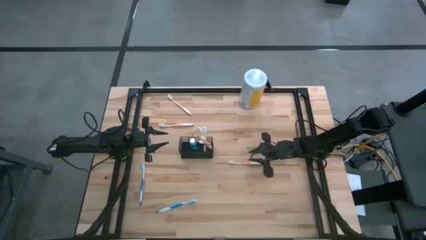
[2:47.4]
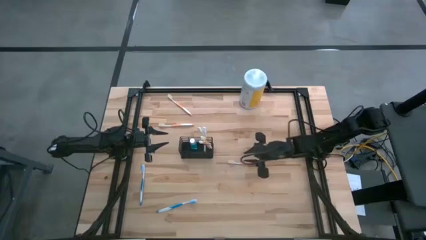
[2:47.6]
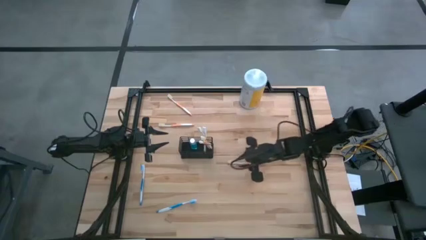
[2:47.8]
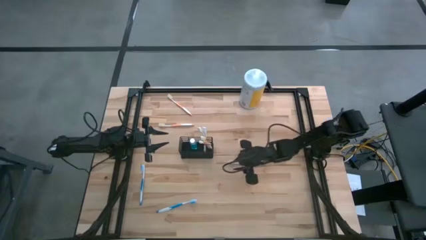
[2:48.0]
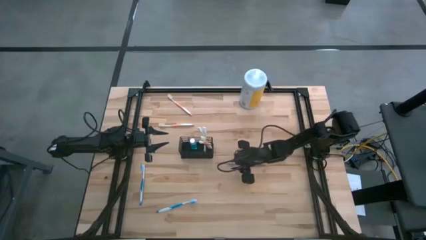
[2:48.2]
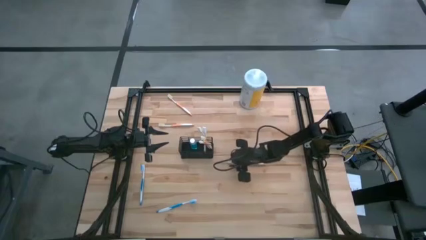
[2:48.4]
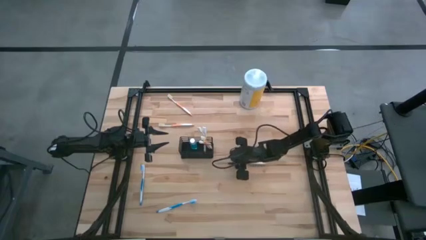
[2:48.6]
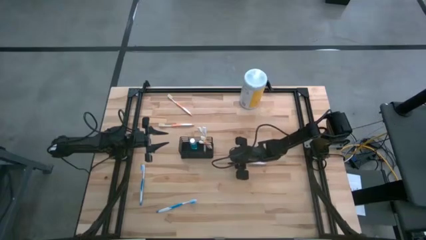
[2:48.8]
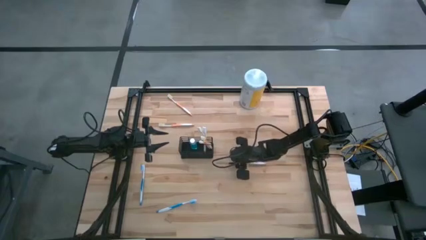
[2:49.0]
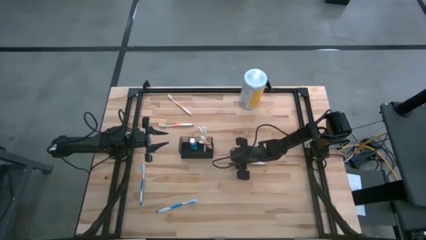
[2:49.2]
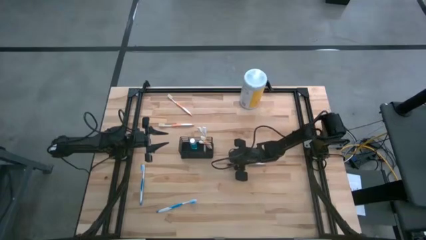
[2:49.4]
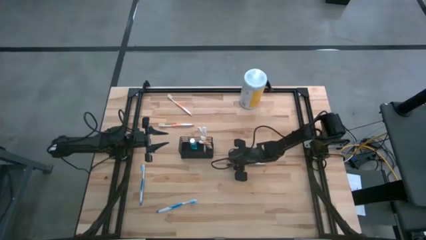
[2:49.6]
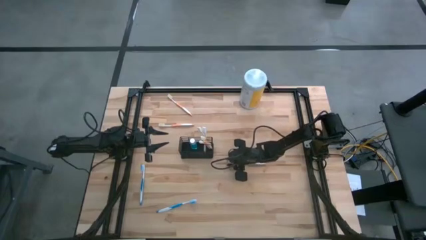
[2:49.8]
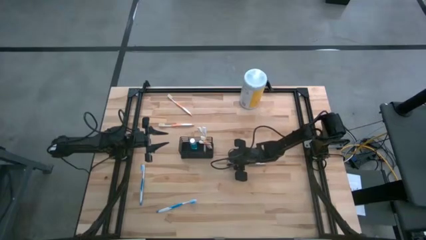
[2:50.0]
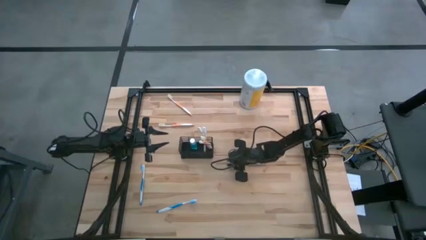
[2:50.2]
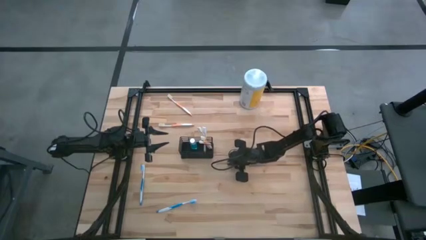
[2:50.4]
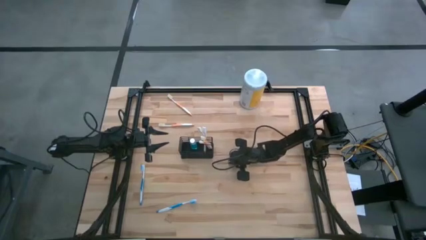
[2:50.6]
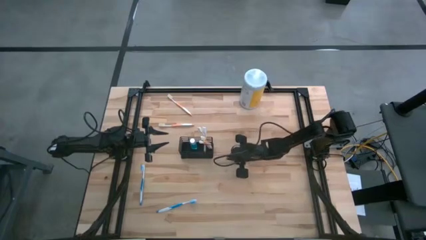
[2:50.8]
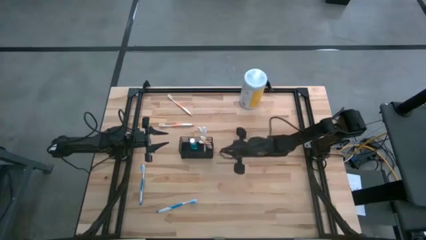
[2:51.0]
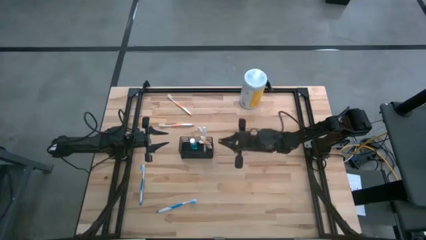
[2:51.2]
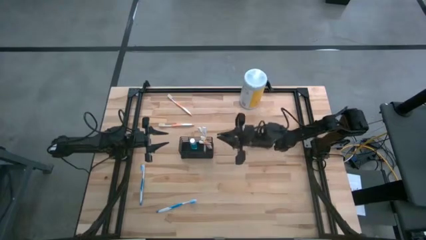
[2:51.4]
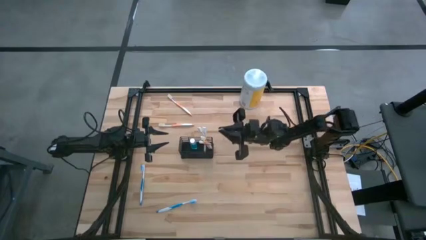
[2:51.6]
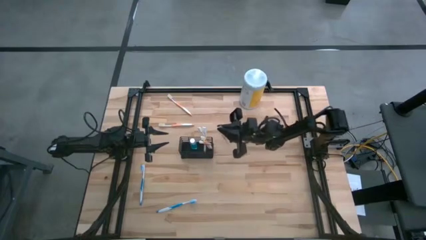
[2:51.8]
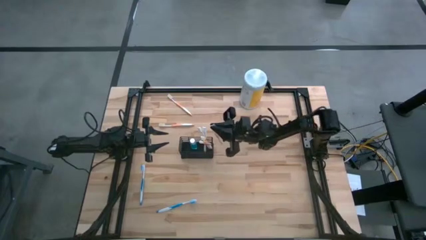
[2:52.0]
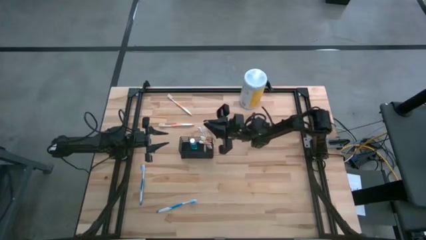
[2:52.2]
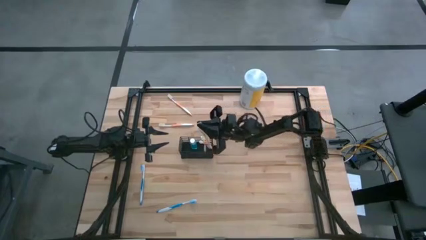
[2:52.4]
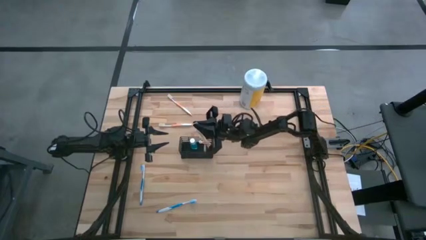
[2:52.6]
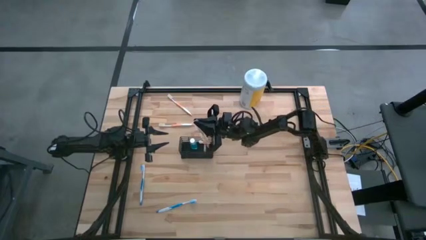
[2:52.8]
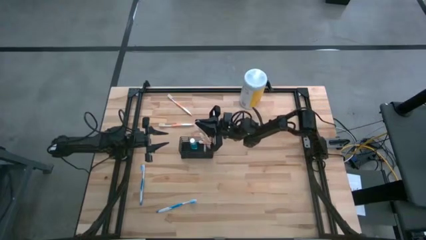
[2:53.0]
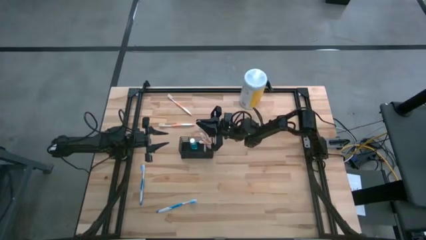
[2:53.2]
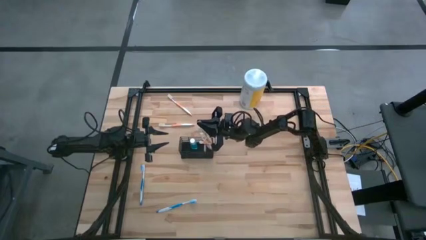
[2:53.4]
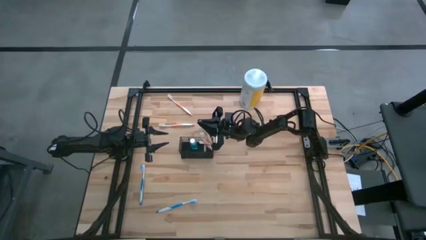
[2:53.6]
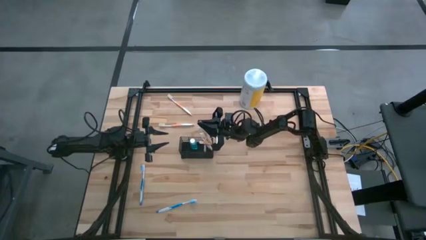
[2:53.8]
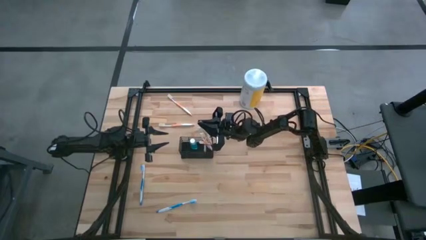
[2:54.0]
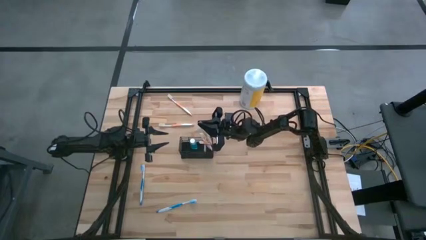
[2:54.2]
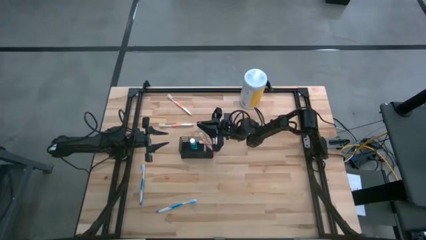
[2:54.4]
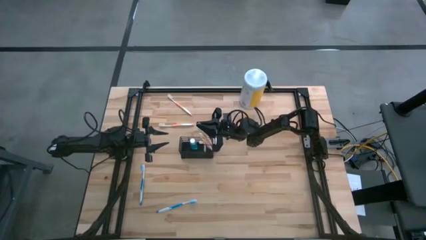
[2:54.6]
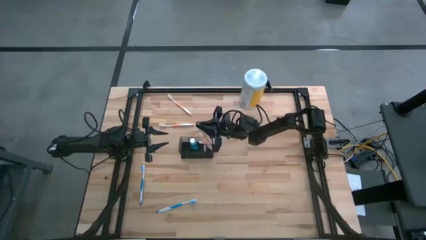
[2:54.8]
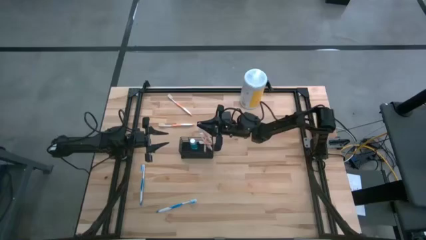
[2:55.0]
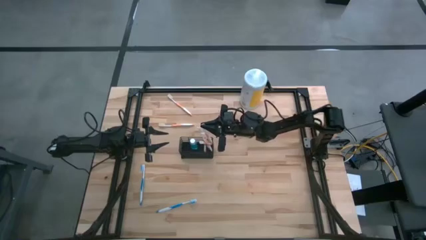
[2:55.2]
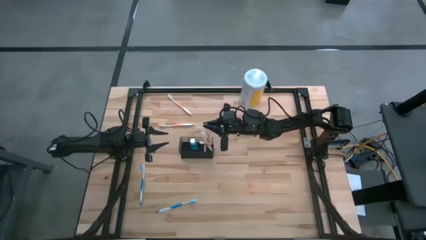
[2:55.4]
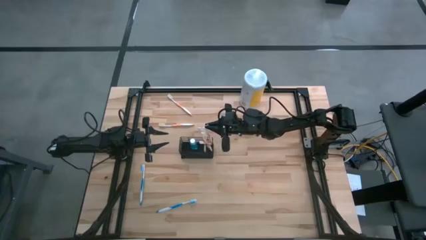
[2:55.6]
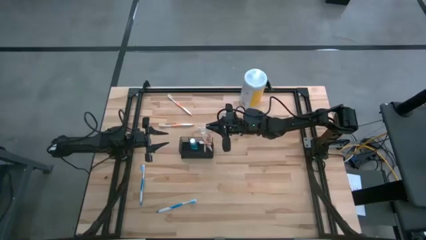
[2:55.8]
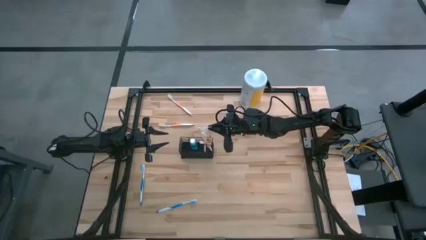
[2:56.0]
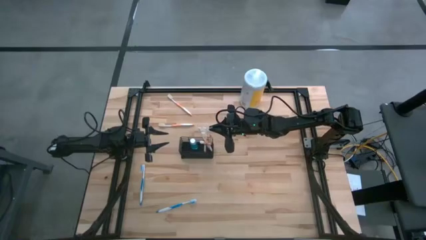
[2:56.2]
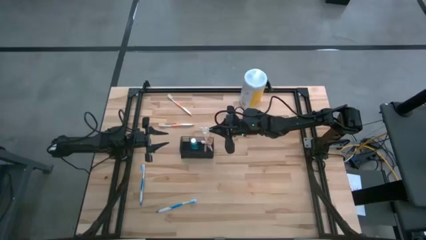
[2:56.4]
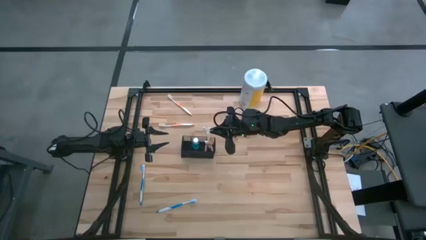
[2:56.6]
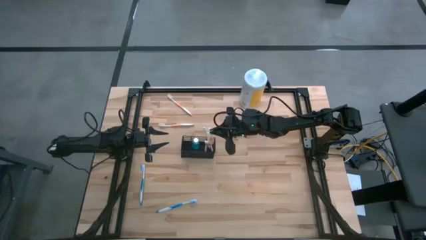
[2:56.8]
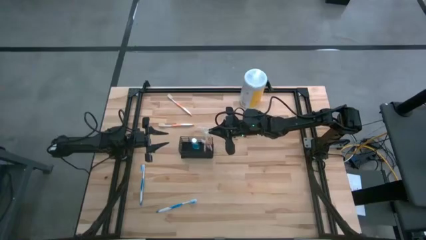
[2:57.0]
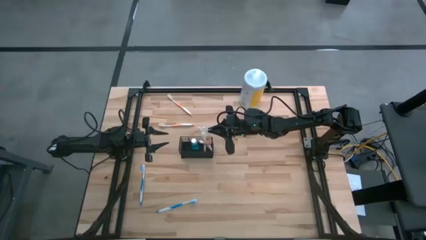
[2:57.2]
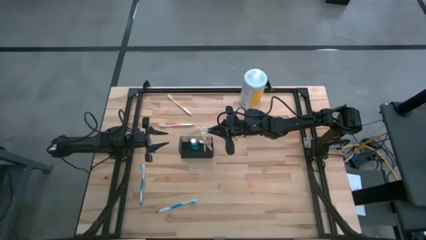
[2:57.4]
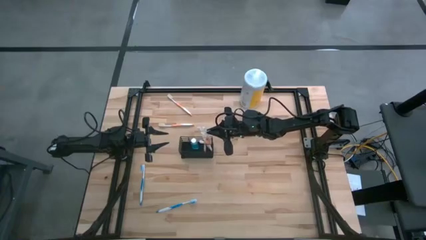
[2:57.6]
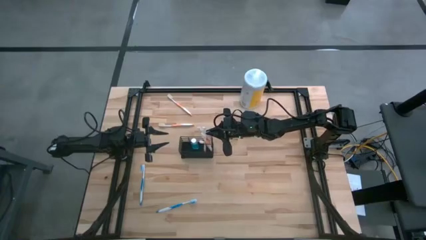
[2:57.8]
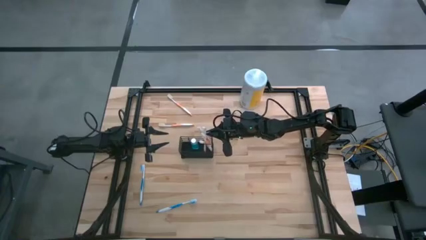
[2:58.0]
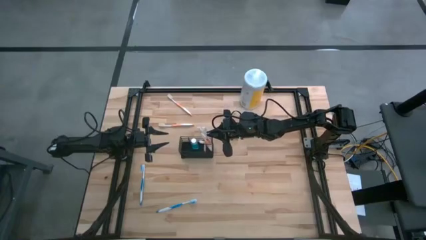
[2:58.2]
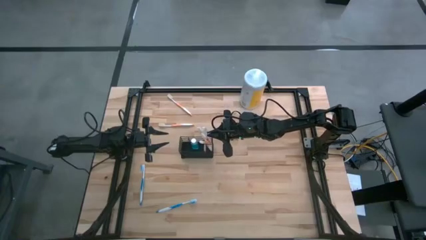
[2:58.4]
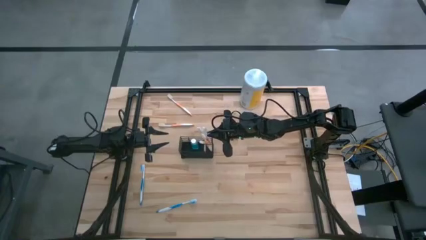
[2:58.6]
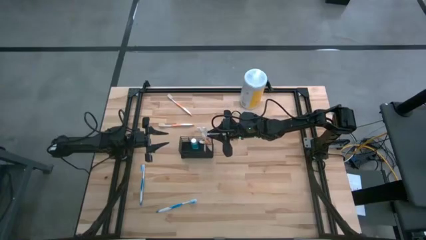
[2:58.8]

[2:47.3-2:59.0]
Task: Pick & Place toothbrushing station
Put the orange toothbrush into the right section of the wire organizer

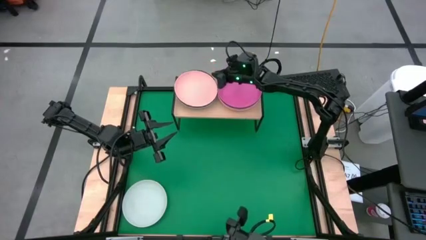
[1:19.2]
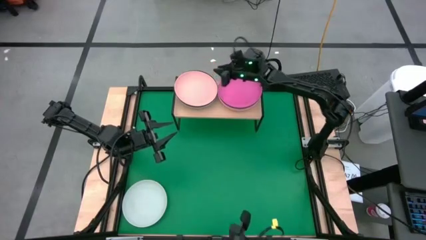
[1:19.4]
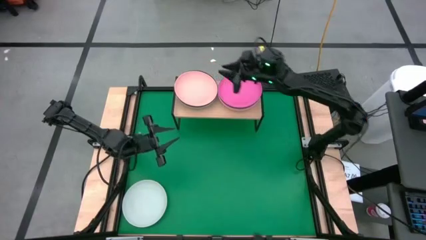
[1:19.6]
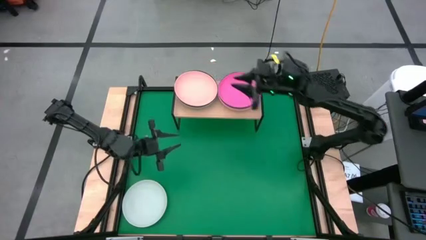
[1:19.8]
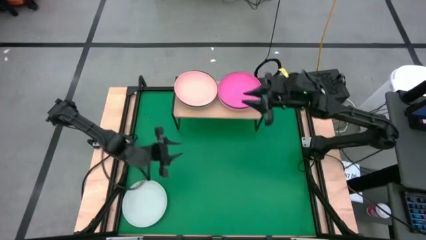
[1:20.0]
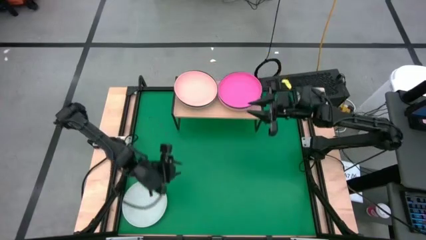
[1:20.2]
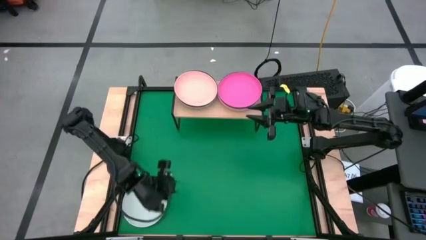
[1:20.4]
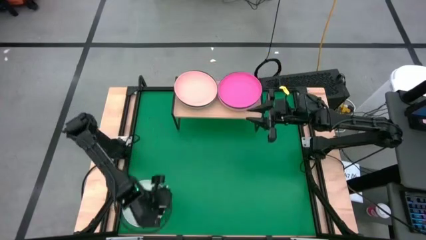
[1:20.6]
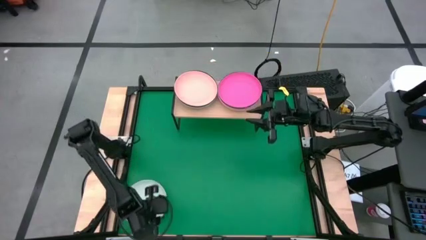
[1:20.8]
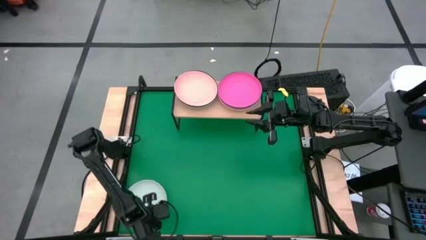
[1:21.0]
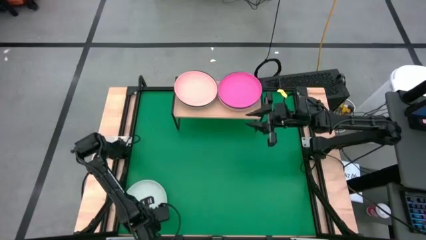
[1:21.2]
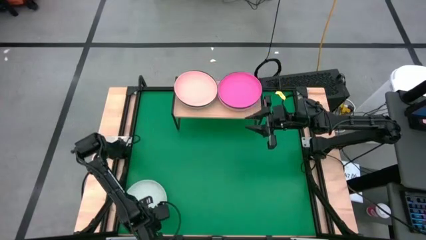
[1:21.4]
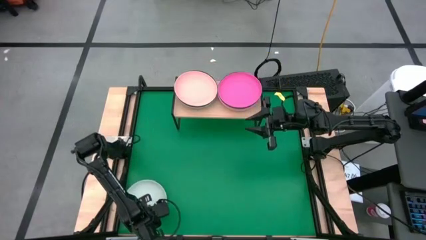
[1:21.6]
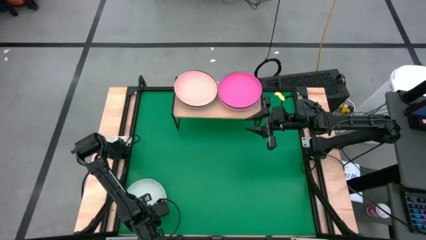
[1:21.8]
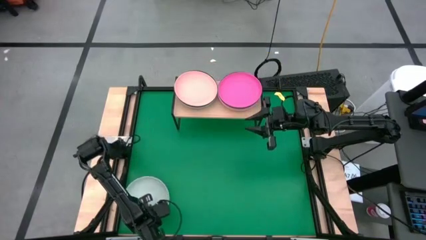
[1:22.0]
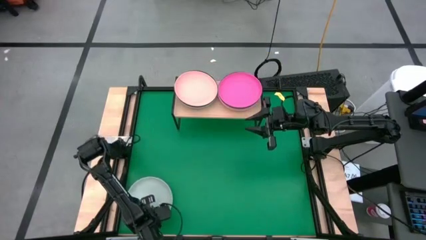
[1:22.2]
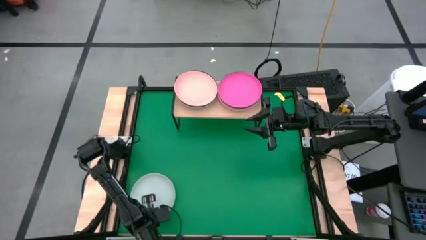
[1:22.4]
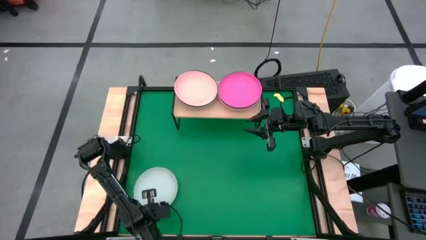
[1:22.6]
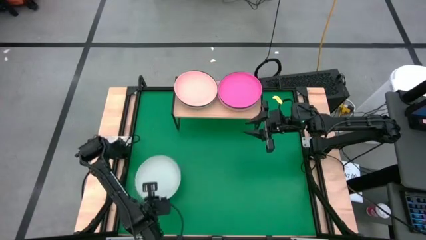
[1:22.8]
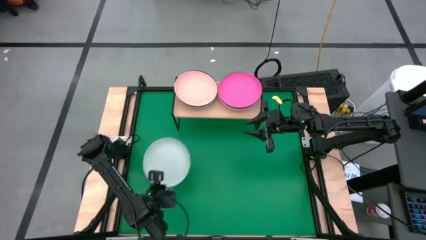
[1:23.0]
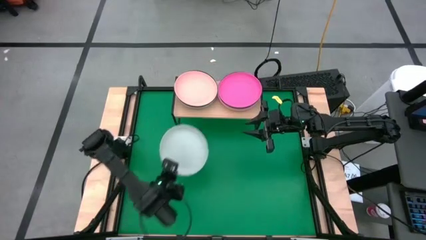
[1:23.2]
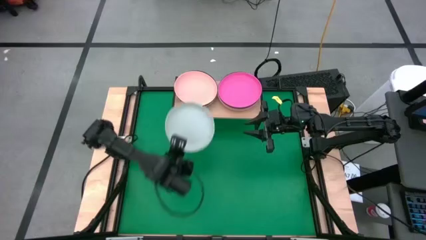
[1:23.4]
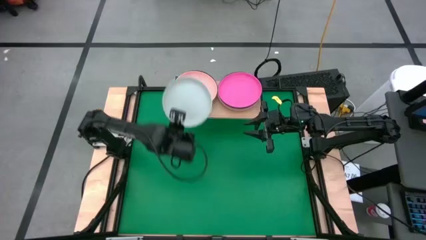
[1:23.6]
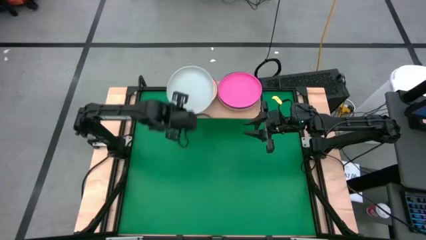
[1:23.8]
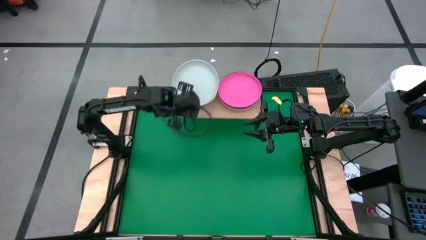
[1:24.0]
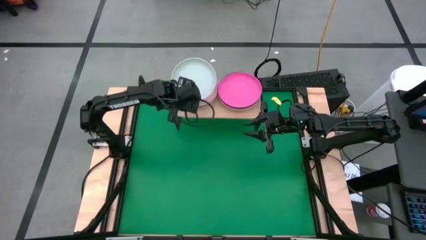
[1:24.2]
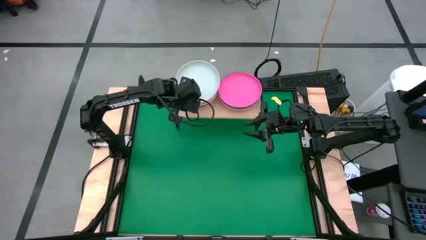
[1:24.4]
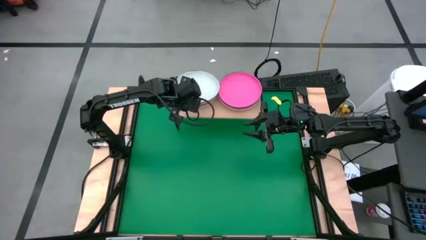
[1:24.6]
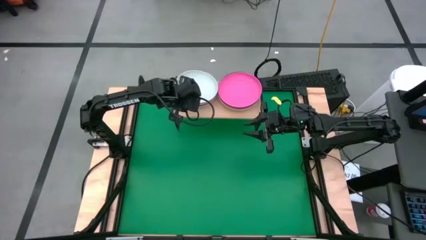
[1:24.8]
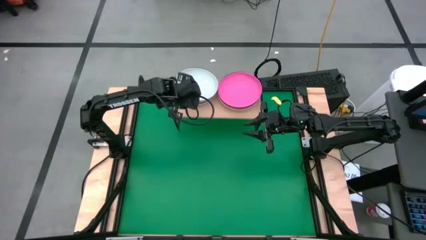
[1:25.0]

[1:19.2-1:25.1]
Task: Place and stack plates onto a shelf
Stack the white plate on top of the light orange plate on the shelf
